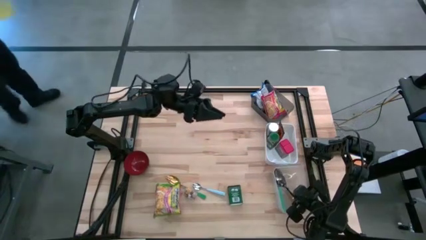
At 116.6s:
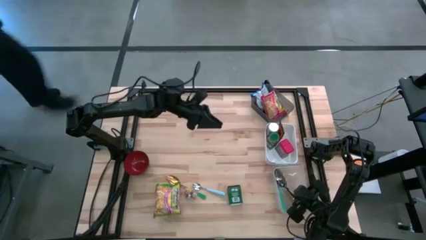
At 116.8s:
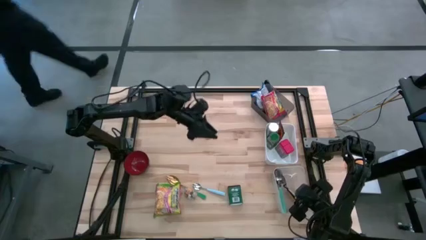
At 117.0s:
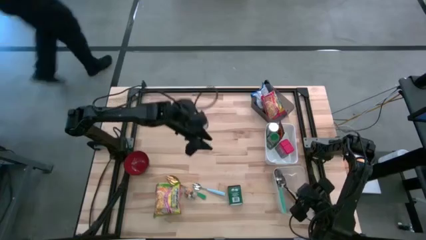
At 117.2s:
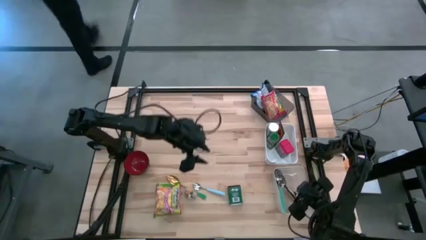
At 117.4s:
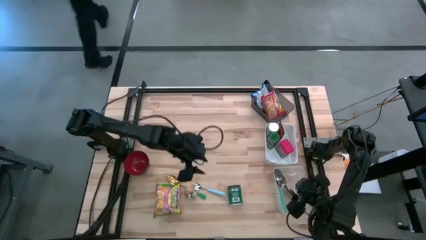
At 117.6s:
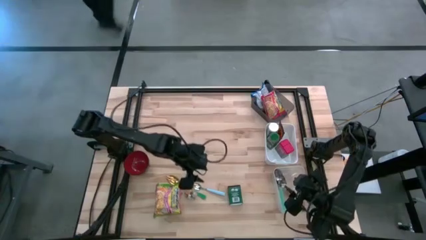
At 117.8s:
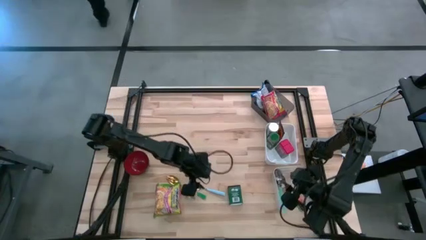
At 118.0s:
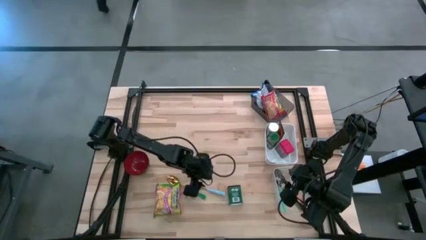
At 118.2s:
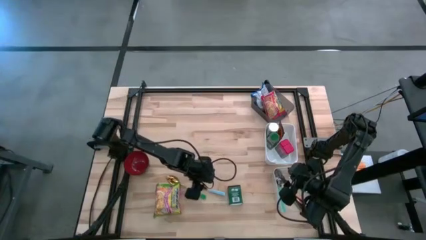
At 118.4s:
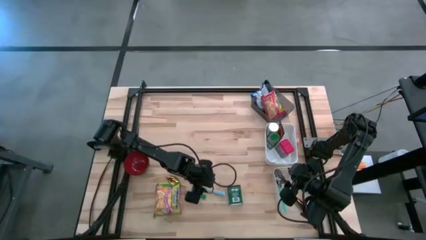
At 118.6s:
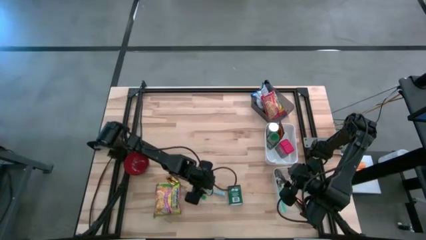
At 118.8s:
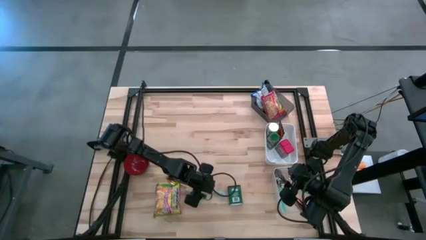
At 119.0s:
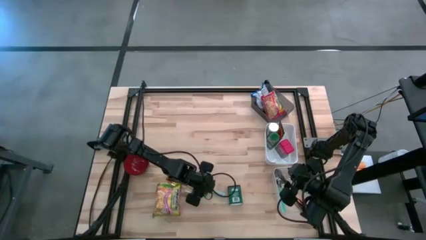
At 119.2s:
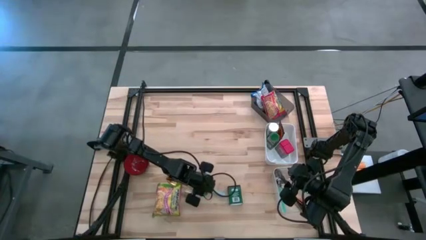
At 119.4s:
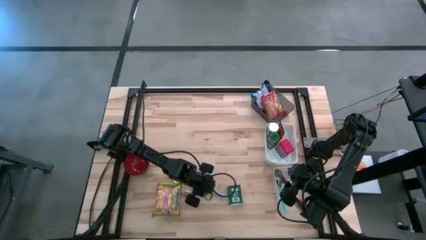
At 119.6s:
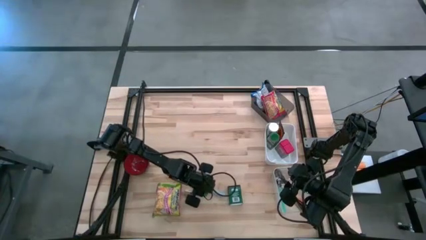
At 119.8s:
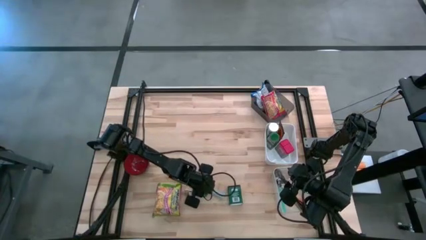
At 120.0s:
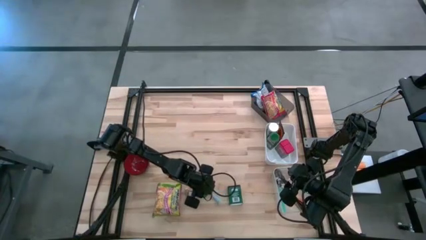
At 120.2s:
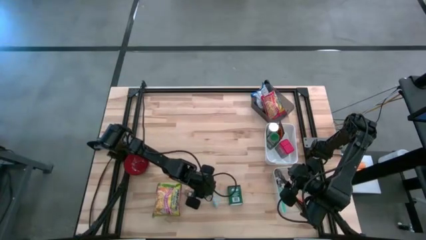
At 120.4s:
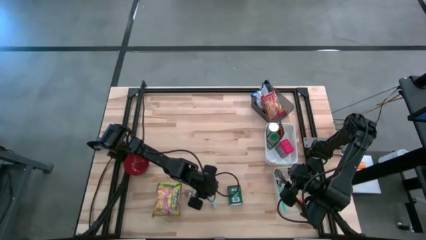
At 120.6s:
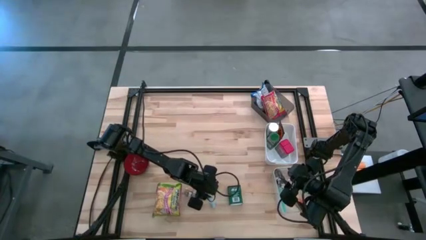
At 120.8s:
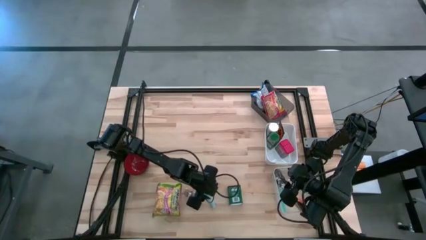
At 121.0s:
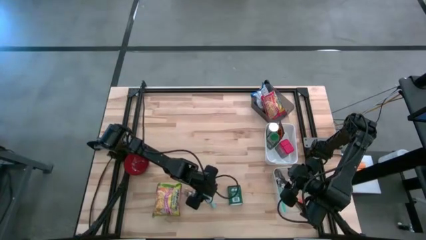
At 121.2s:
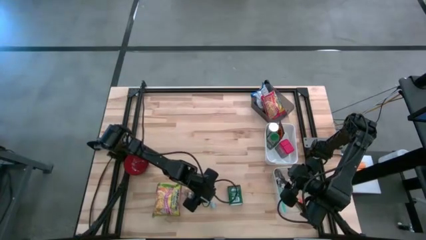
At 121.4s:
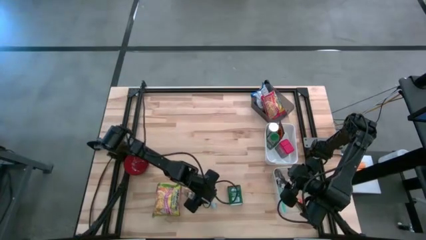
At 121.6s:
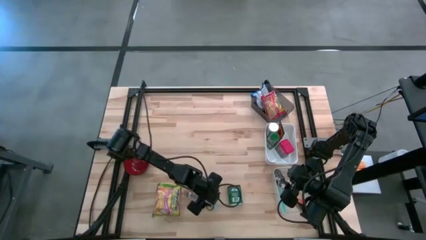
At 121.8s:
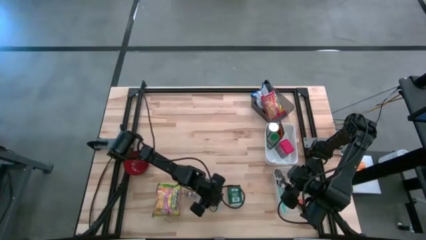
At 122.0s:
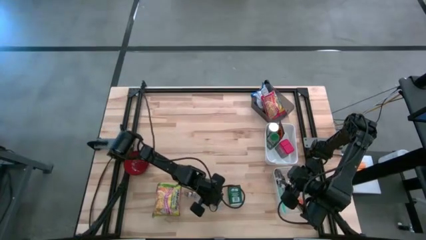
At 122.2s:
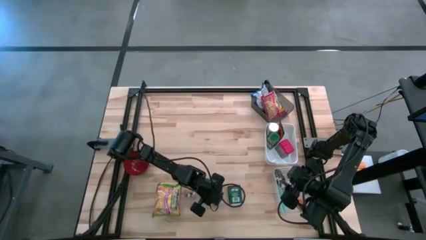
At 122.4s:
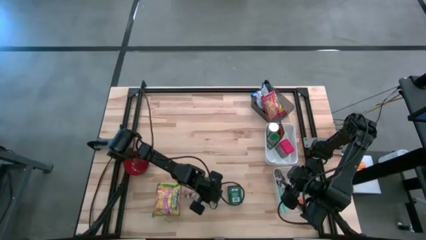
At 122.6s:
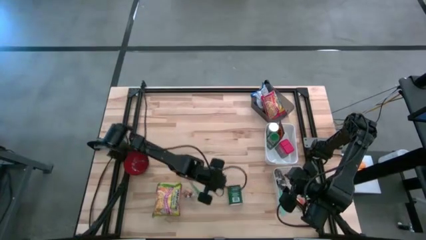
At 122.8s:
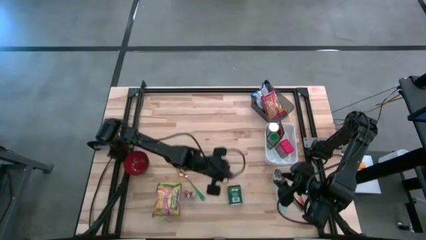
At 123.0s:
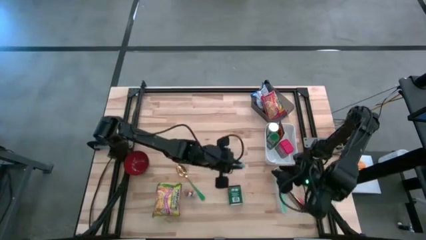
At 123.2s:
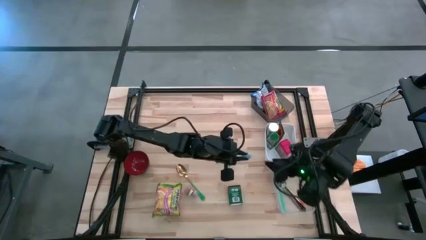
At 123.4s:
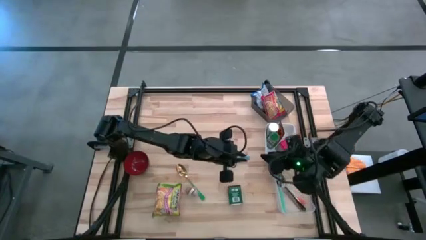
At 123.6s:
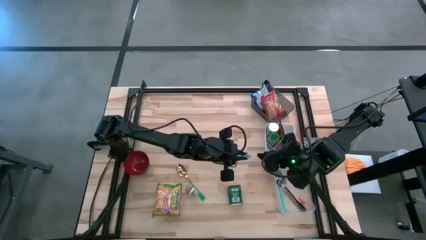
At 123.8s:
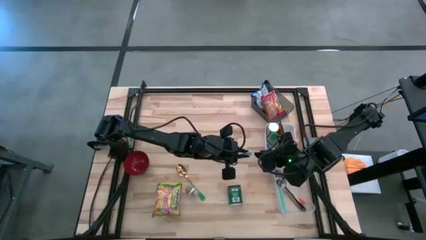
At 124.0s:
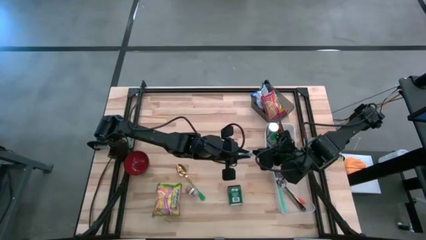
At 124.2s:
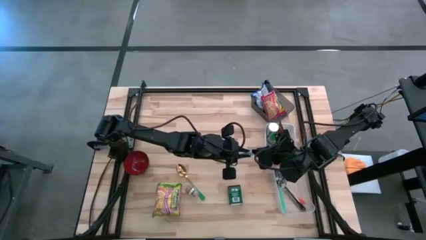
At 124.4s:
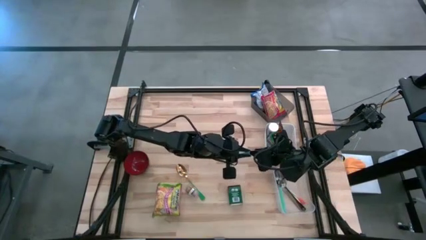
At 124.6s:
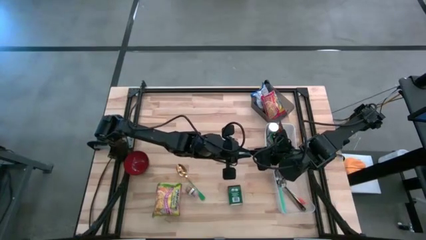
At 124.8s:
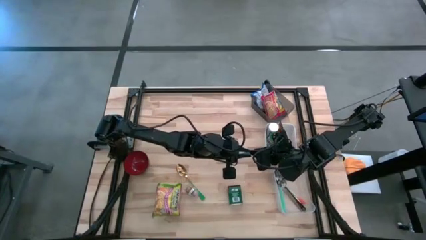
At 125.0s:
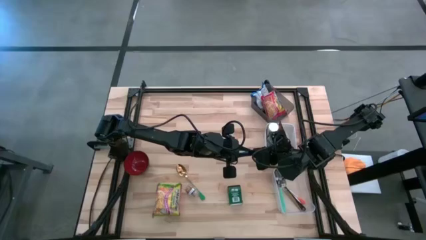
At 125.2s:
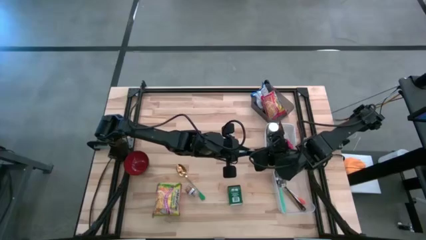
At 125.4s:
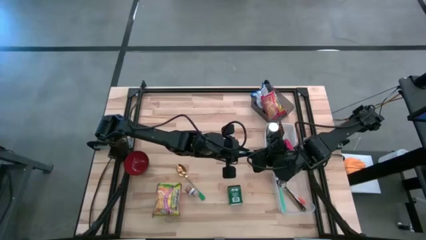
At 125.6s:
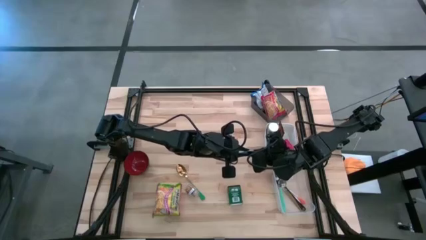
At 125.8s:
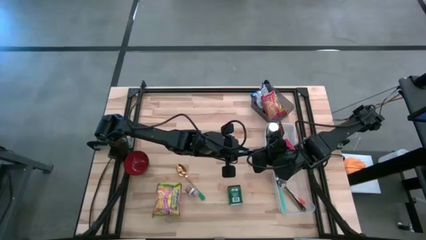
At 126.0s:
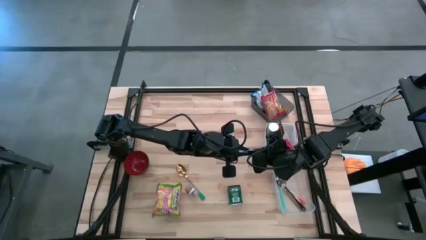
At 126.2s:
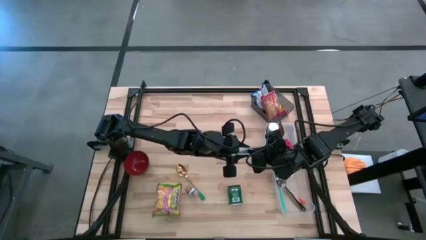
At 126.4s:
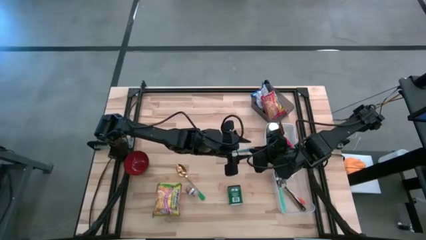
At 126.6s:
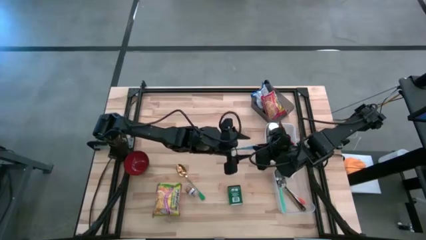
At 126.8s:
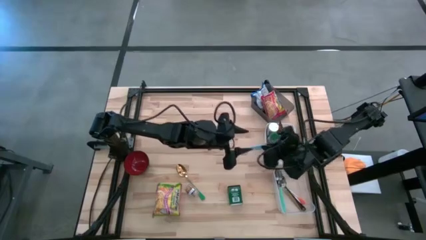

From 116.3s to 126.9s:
Put the blue spoon into the transparent bin
